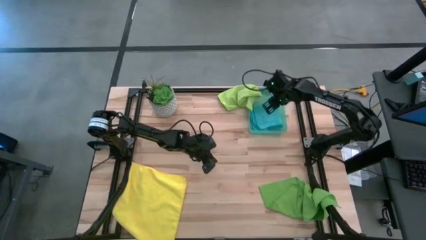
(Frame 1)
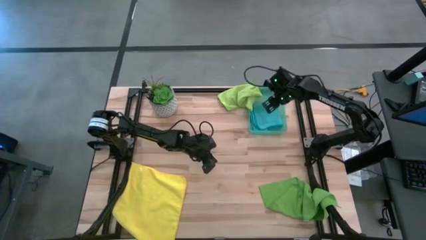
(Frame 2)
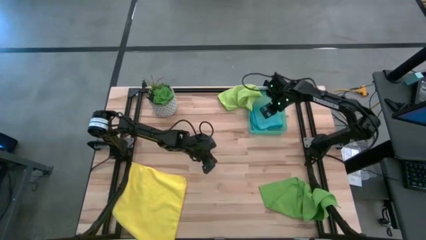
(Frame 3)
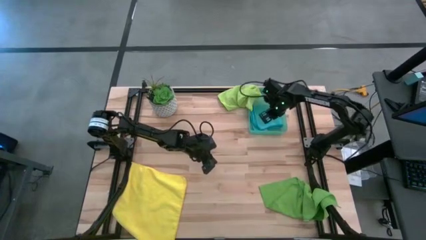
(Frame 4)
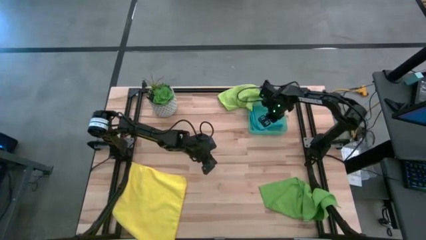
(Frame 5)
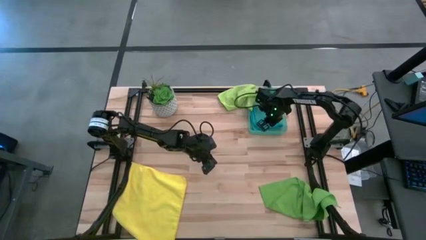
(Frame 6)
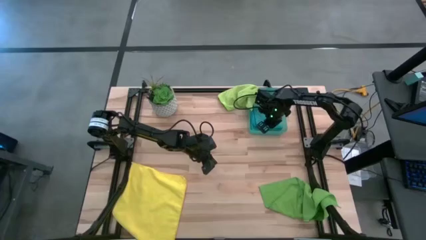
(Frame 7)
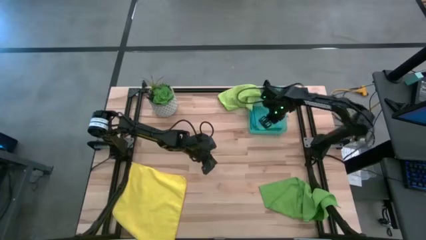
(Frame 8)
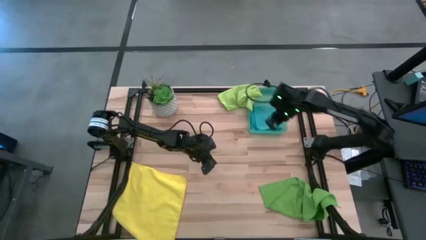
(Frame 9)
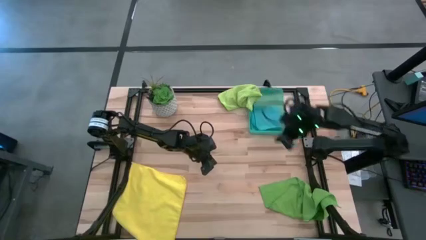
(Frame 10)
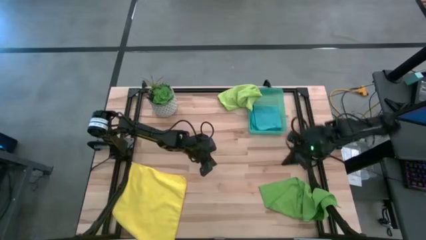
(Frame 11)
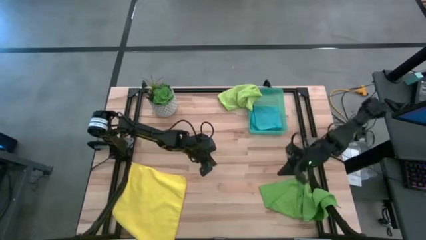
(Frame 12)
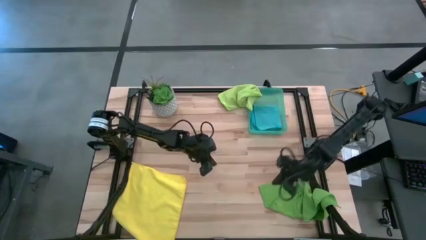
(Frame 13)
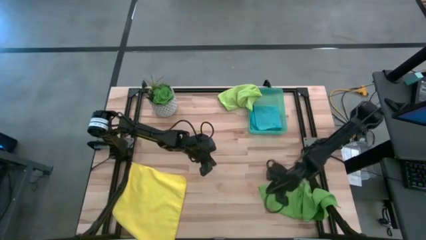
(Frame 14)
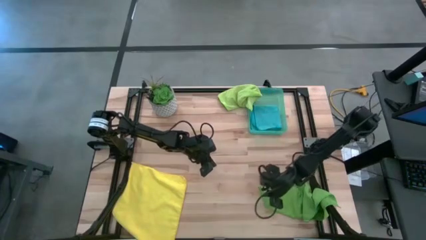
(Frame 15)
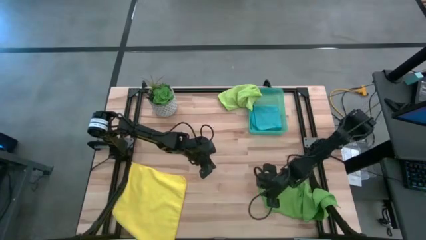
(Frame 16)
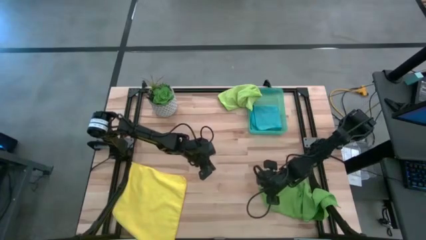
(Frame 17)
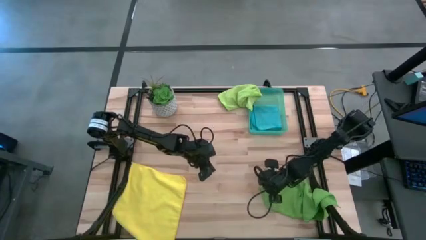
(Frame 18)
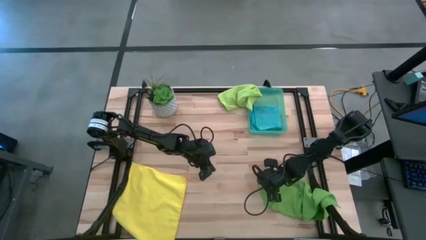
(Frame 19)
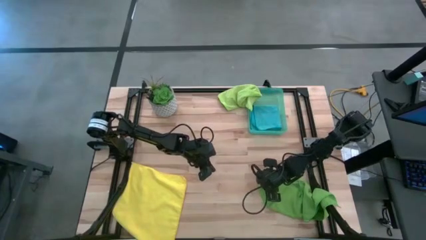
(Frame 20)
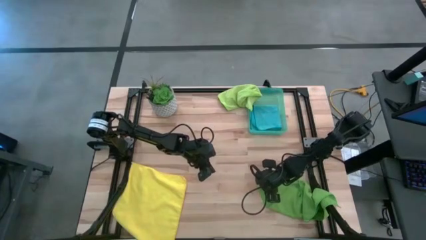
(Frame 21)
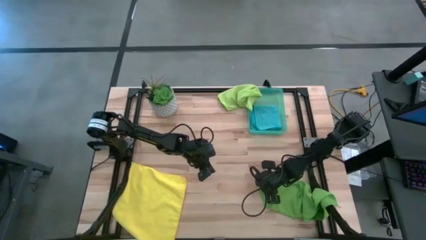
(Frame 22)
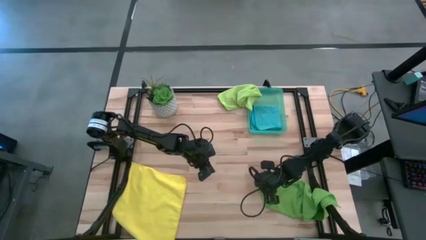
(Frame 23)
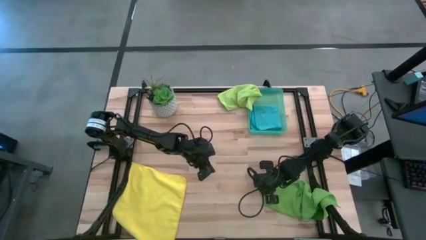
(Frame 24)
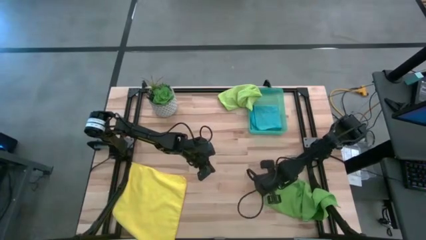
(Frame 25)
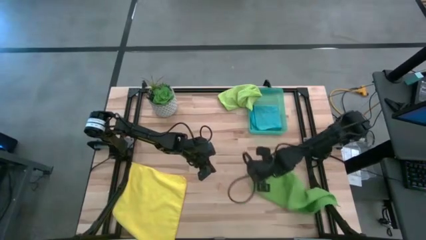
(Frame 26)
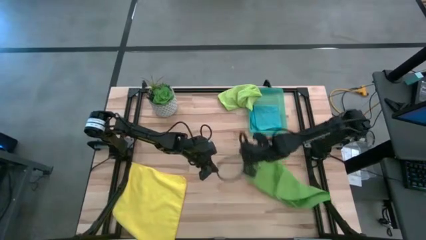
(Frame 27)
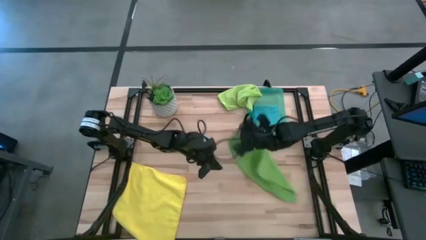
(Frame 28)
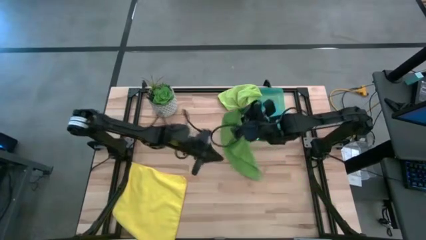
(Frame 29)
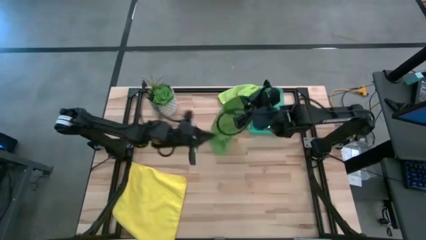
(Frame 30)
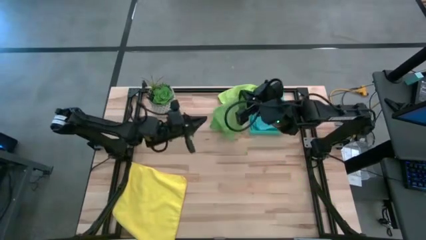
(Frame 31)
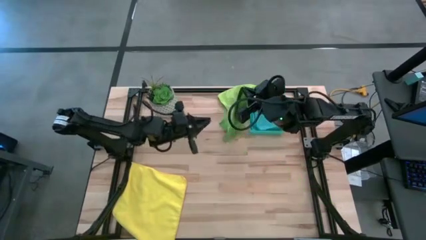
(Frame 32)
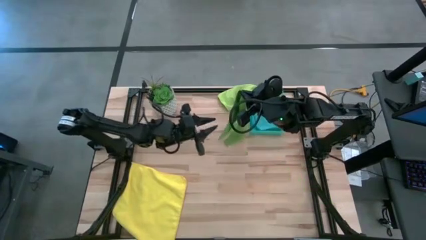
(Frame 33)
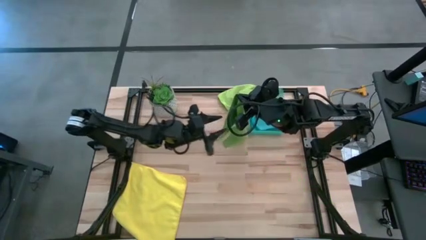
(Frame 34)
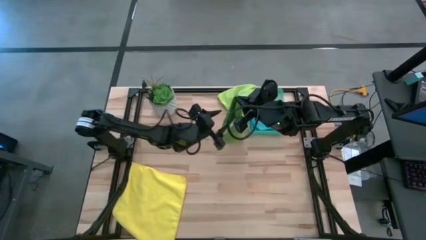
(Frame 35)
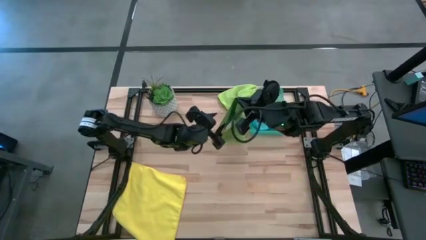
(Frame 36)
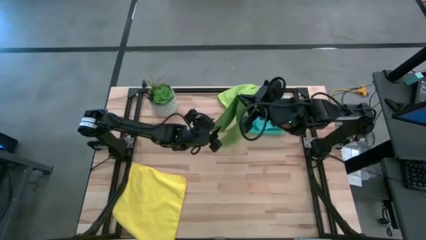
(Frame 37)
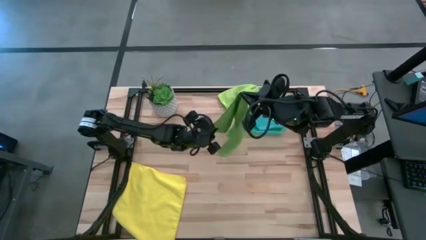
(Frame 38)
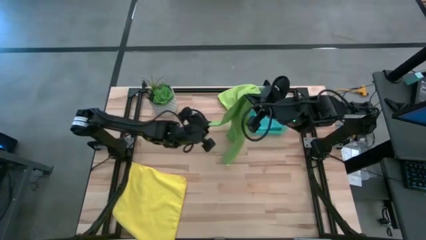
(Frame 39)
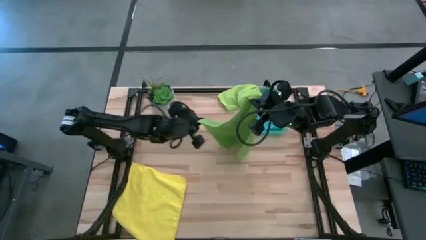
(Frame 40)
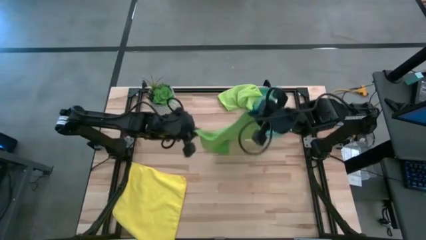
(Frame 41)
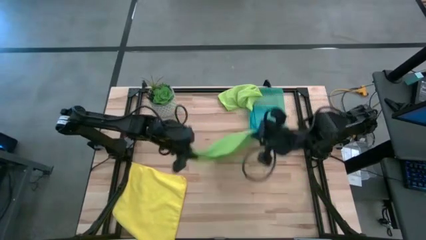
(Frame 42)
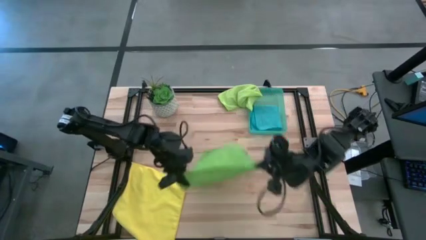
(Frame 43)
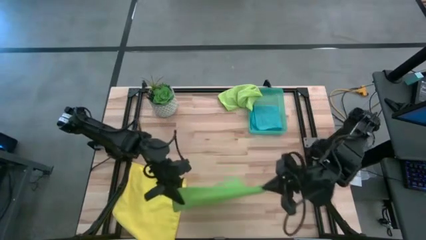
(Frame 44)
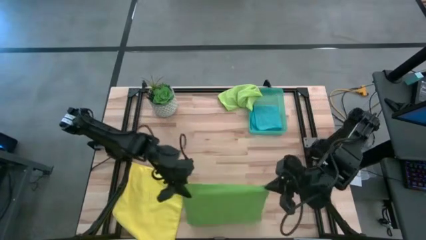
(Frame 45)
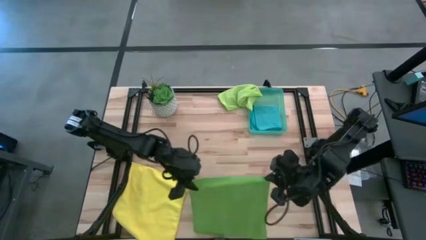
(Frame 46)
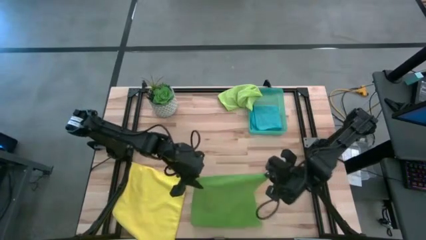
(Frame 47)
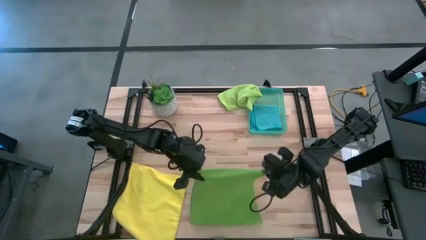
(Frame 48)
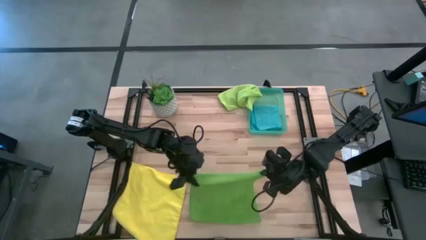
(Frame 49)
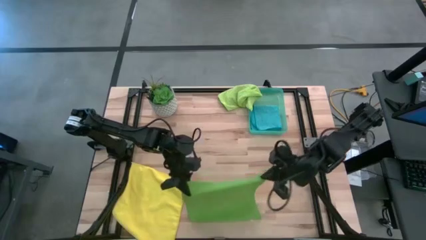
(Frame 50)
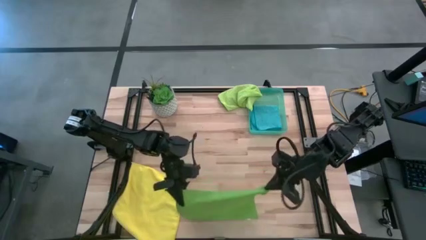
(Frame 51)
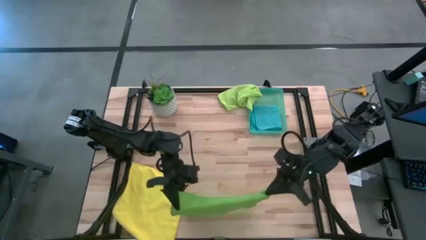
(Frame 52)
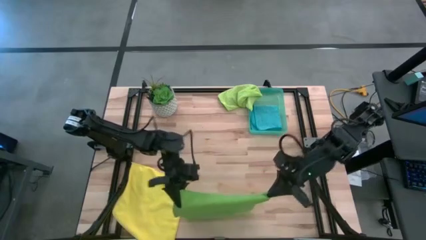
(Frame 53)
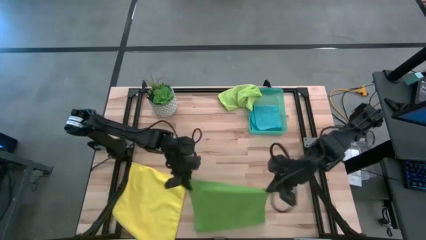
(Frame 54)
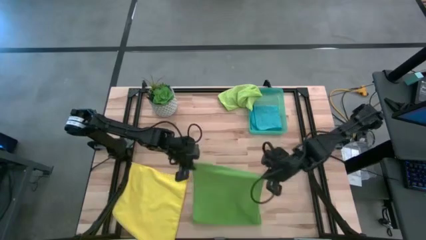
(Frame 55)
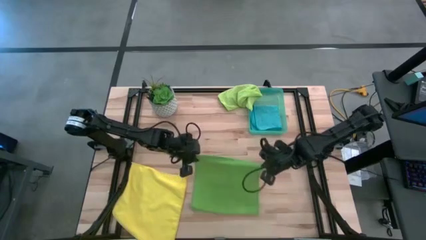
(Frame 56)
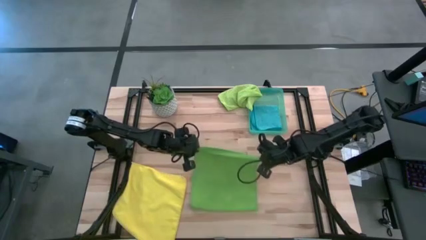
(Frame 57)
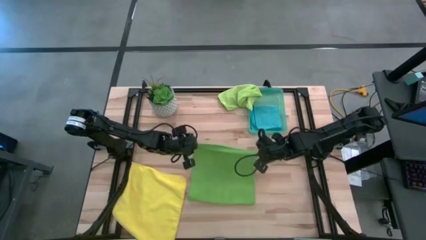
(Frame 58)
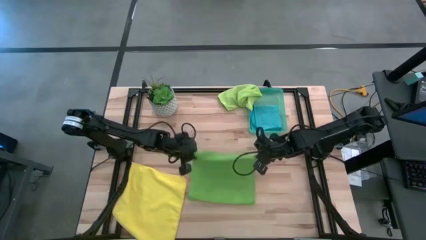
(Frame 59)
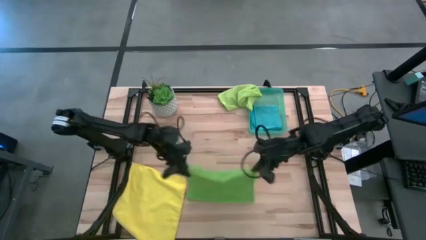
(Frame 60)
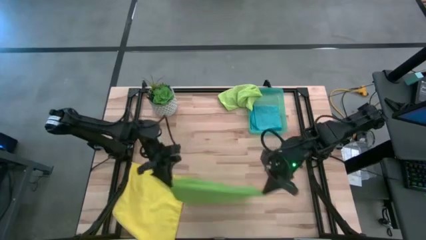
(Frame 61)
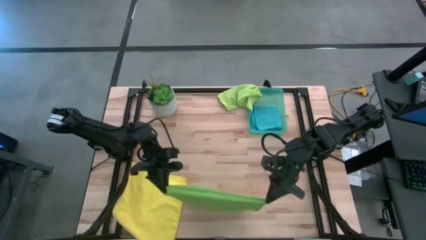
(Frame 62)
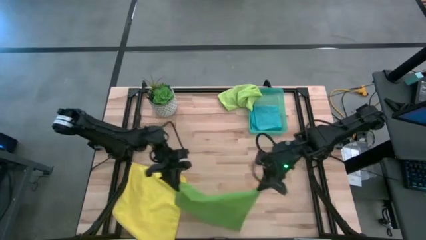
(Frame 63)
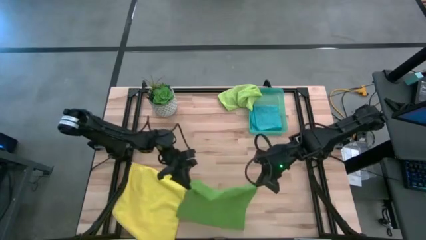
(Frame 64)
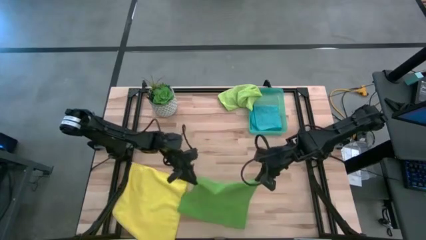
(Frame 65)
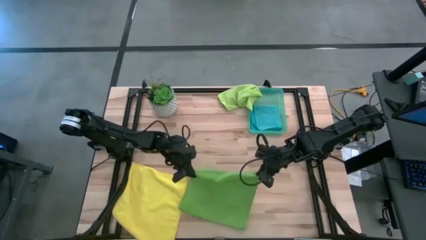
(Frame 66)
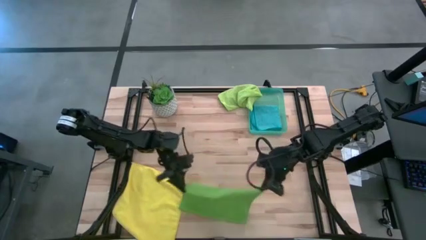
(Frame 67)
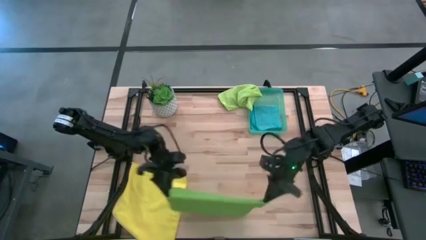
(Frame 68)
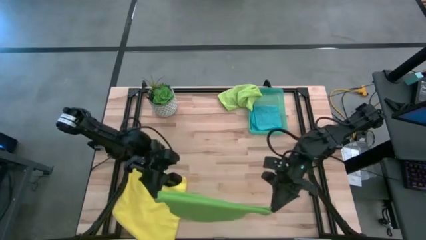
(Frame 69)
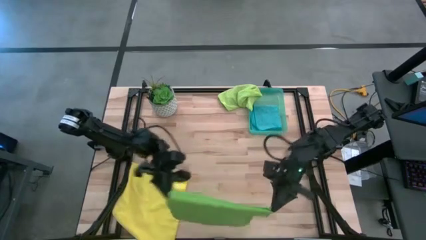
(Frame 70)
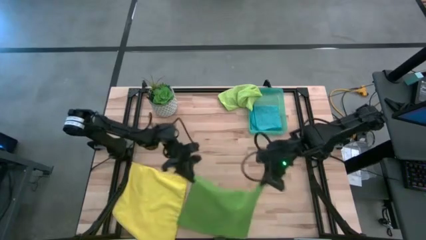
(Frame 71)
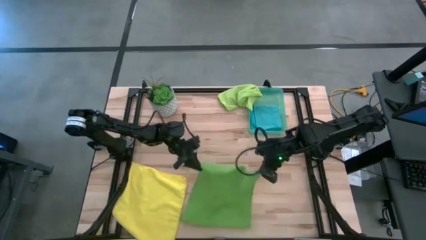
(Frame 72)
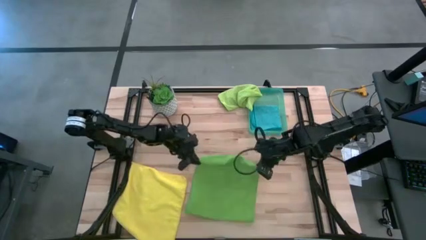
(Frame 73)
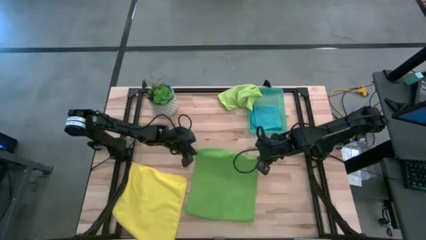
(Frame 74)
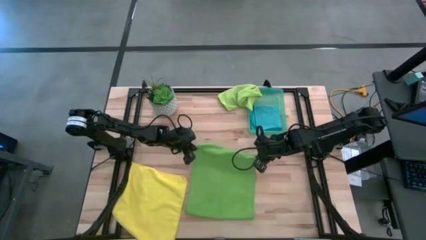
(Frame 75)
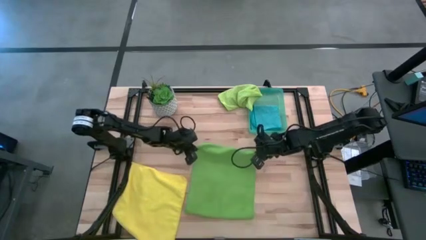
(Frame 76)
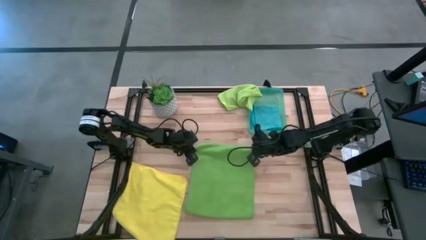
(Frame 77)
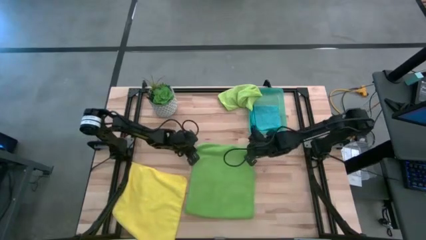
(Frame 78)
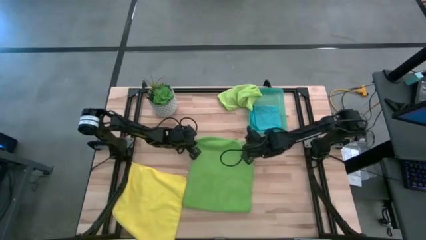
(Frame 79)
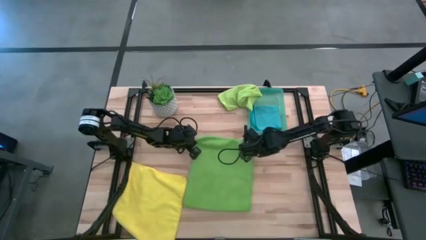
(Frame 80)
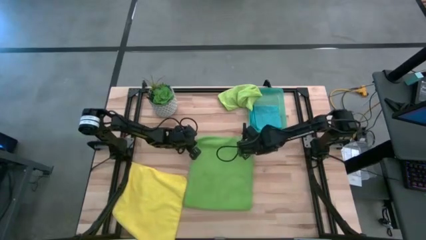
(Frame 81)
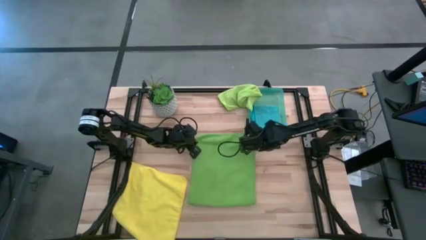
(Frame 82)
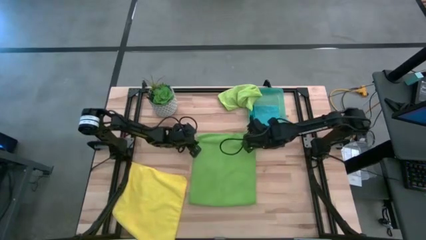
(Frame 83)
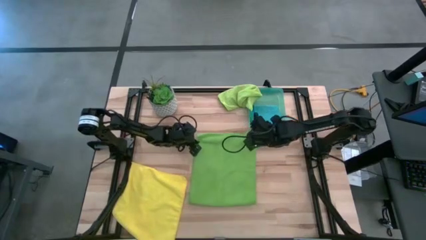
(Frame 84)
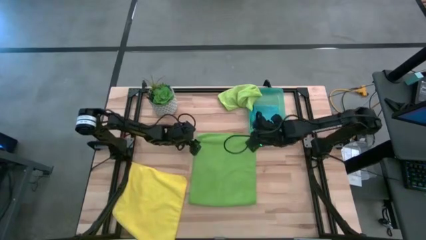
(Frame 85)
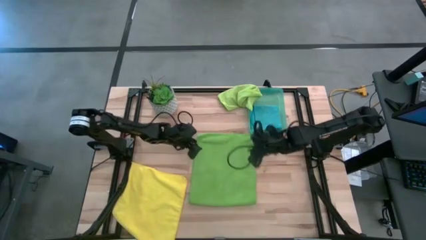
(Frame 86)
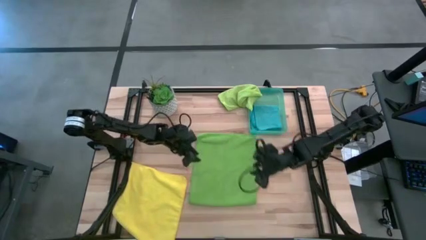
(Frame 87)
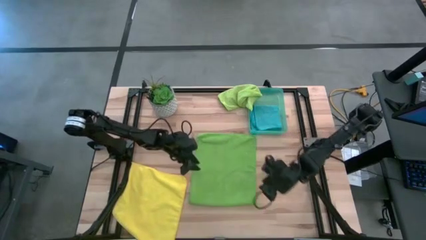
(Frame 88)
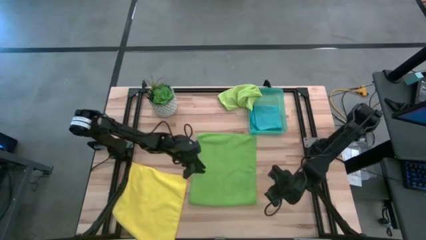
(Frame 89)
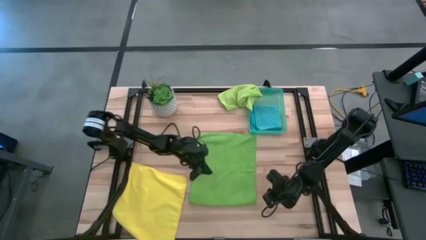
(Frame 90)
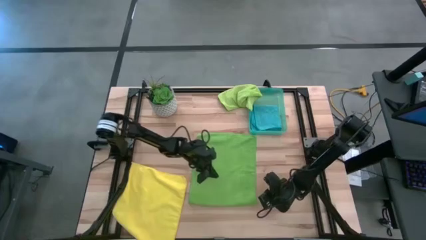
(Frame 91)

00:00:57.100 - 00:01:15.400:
Task: Fold microfiber towels
Fold the green towel
